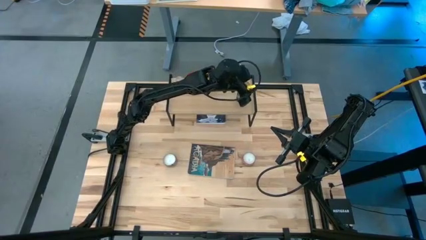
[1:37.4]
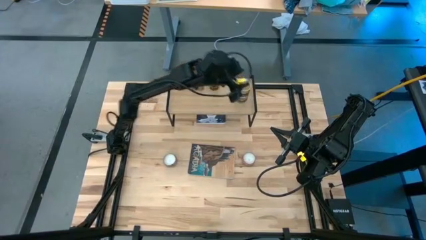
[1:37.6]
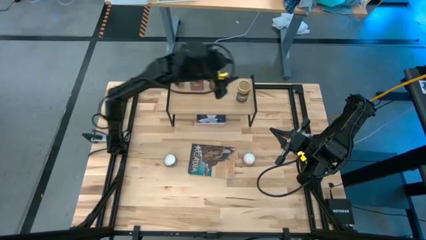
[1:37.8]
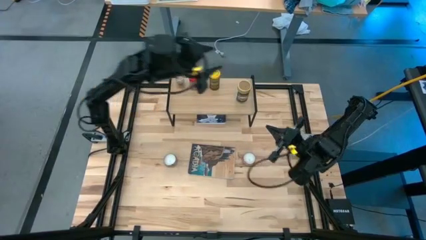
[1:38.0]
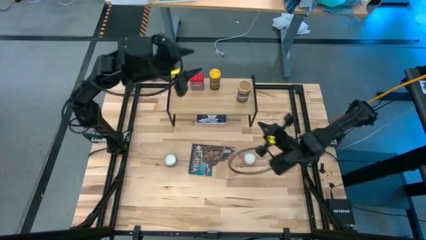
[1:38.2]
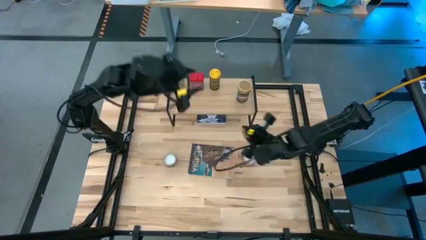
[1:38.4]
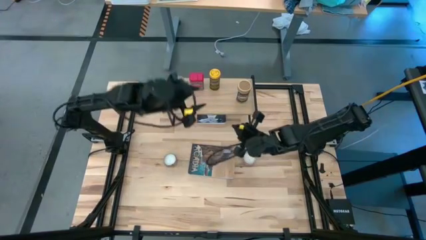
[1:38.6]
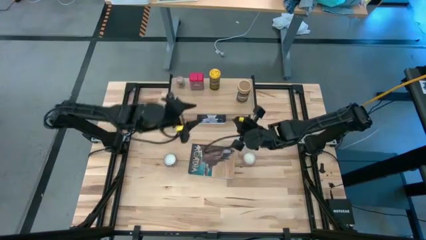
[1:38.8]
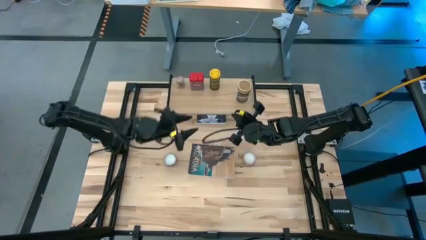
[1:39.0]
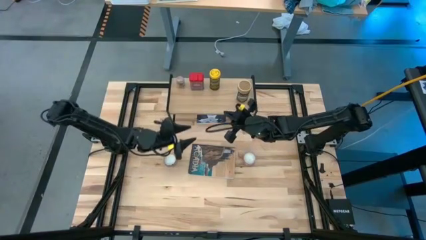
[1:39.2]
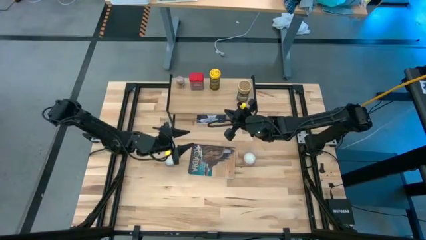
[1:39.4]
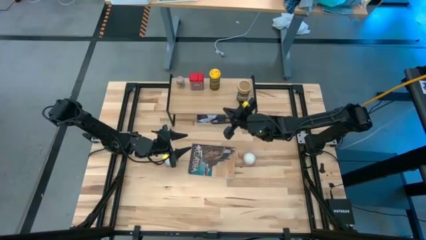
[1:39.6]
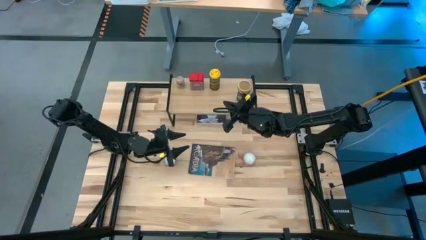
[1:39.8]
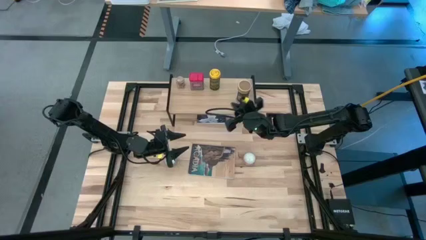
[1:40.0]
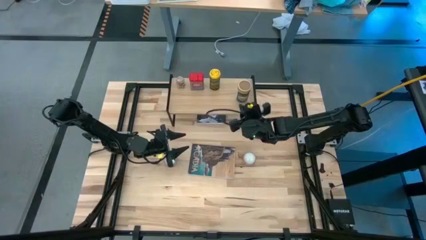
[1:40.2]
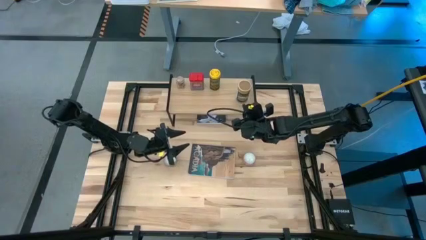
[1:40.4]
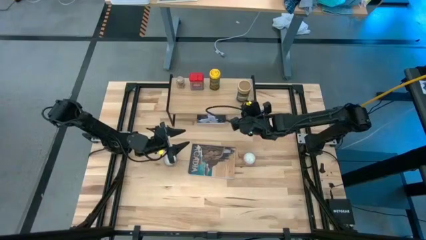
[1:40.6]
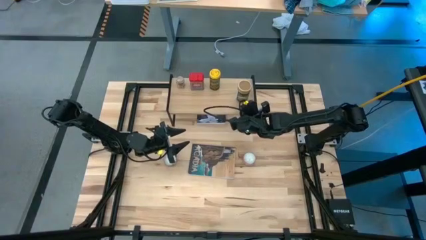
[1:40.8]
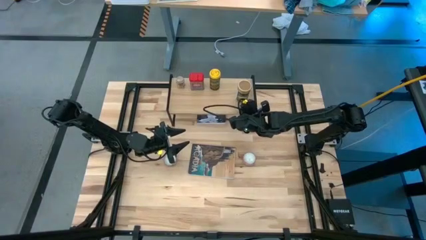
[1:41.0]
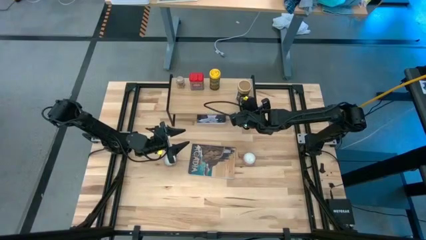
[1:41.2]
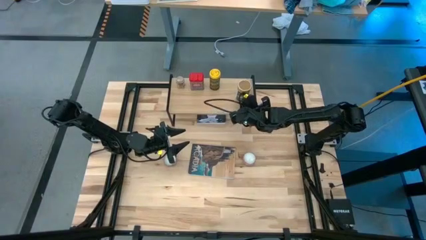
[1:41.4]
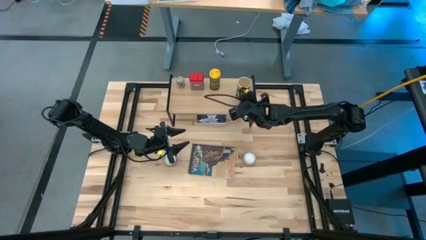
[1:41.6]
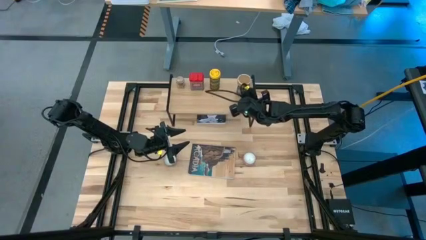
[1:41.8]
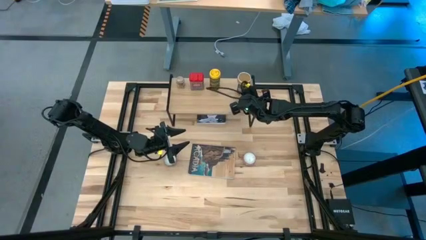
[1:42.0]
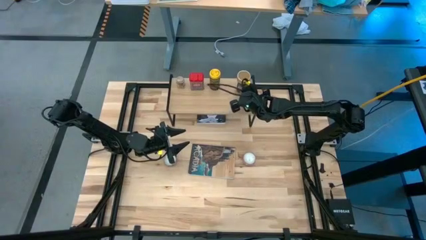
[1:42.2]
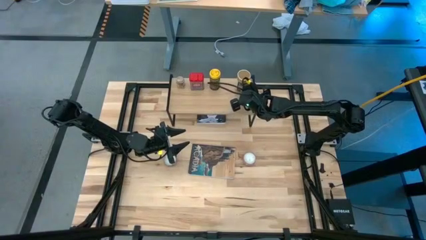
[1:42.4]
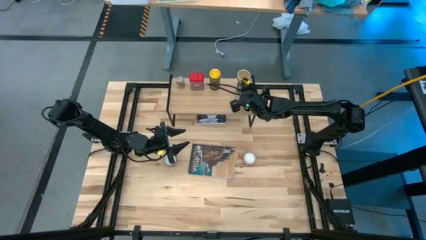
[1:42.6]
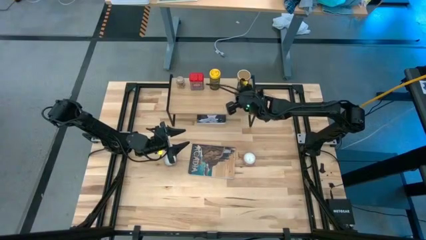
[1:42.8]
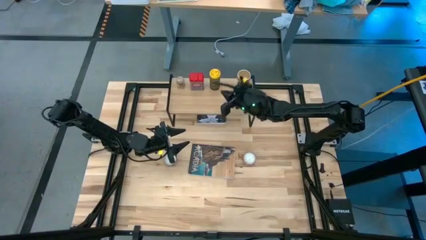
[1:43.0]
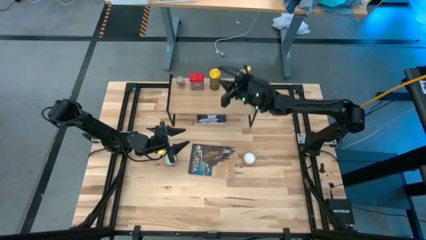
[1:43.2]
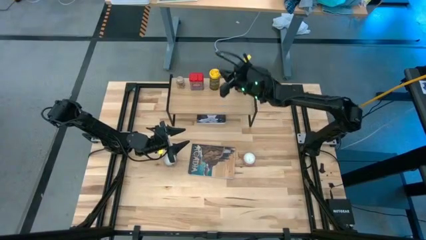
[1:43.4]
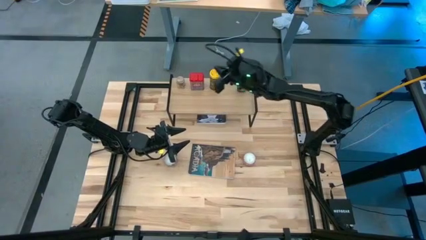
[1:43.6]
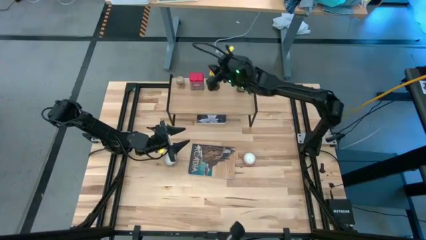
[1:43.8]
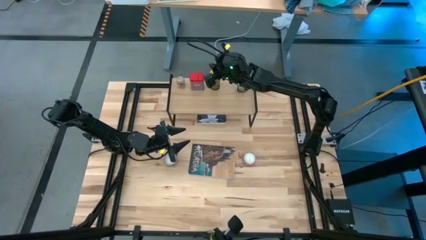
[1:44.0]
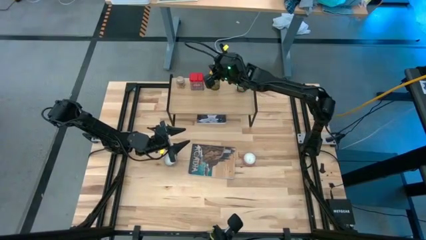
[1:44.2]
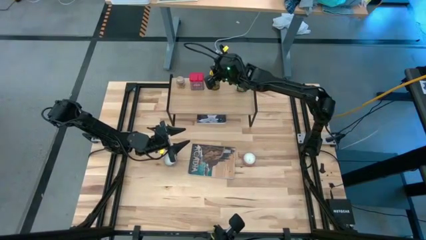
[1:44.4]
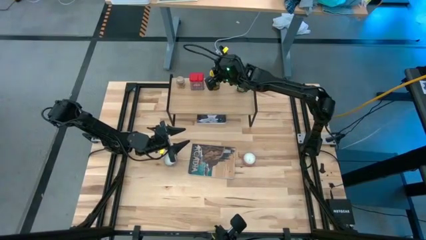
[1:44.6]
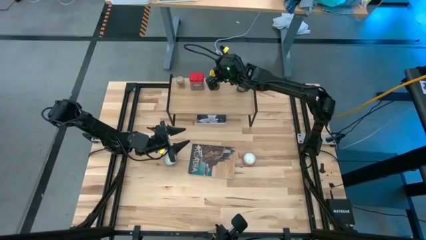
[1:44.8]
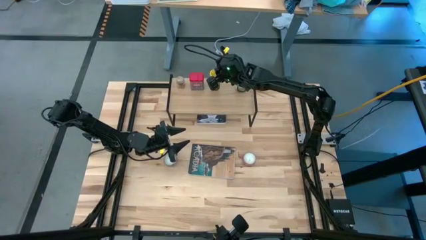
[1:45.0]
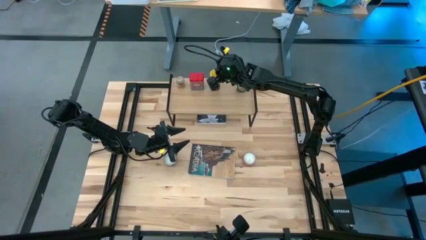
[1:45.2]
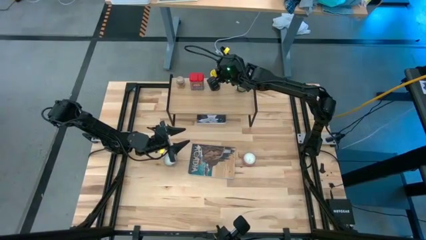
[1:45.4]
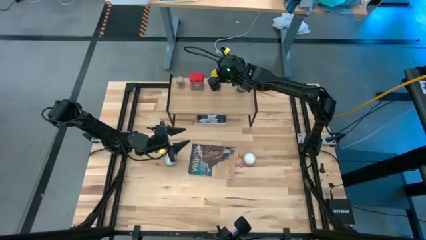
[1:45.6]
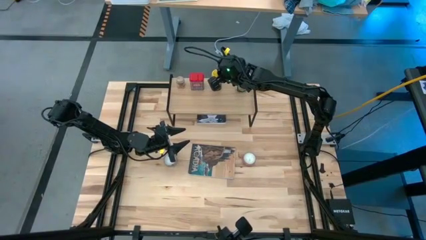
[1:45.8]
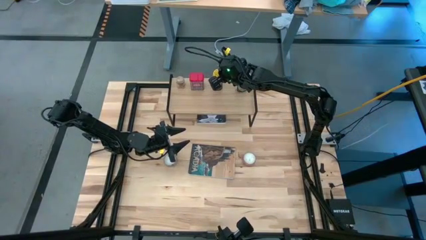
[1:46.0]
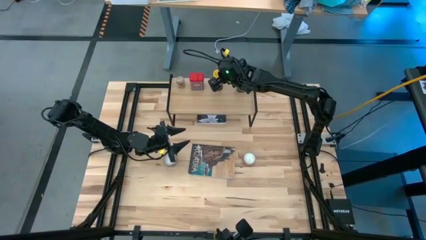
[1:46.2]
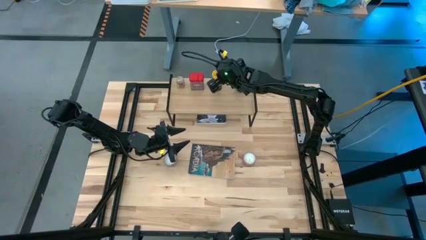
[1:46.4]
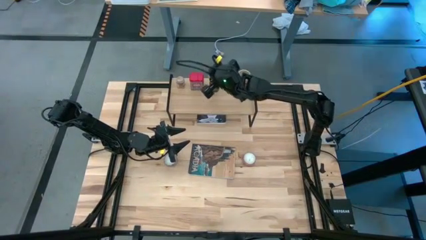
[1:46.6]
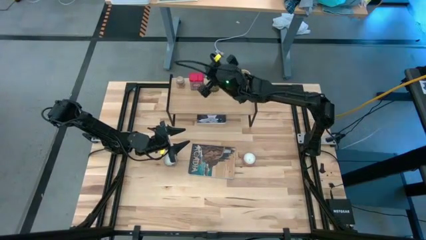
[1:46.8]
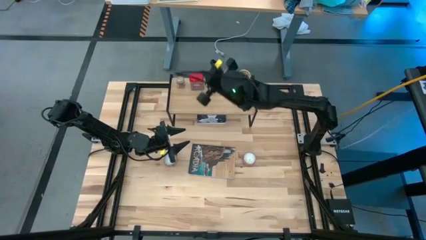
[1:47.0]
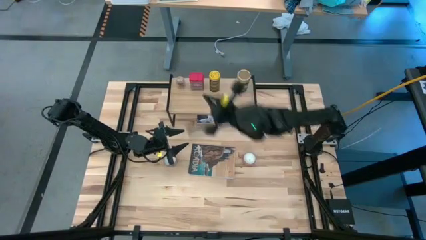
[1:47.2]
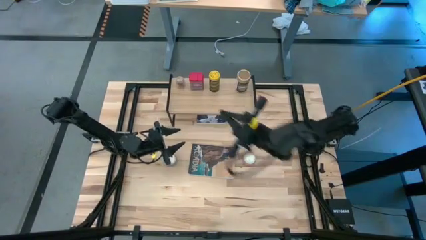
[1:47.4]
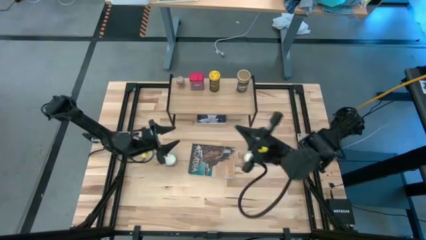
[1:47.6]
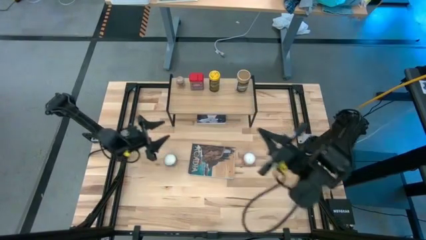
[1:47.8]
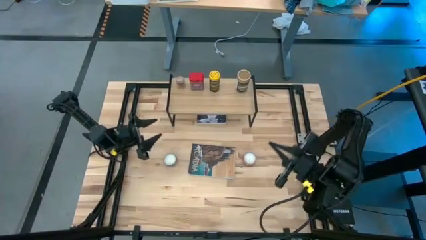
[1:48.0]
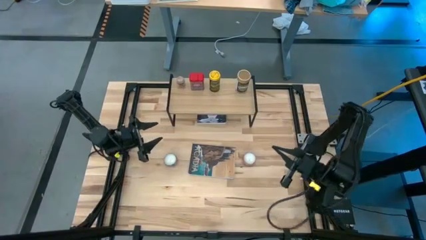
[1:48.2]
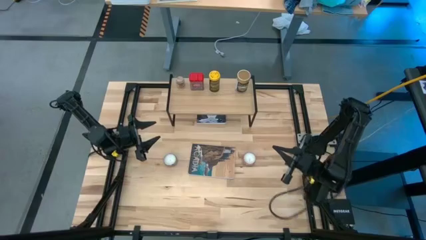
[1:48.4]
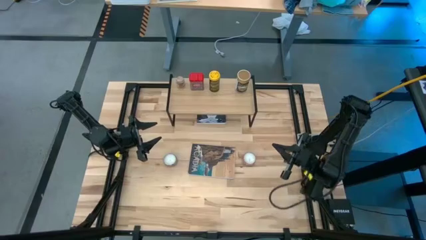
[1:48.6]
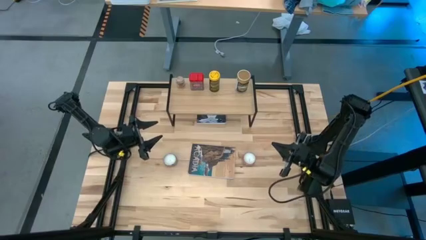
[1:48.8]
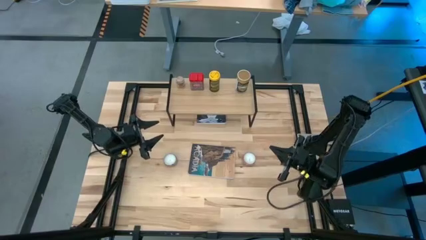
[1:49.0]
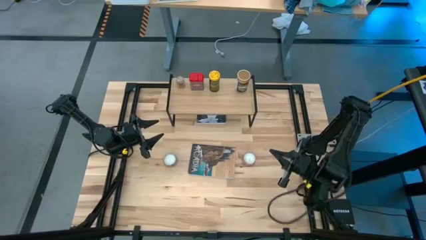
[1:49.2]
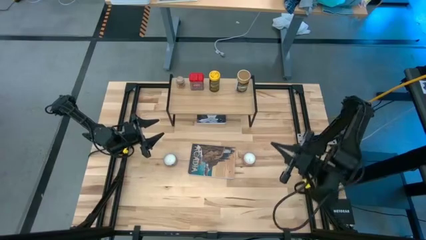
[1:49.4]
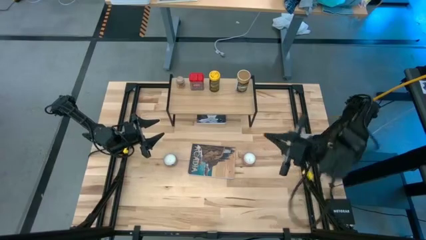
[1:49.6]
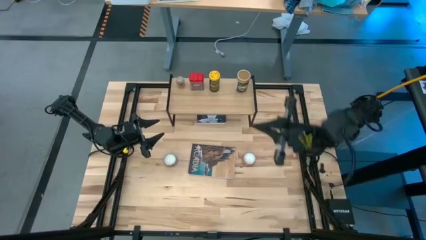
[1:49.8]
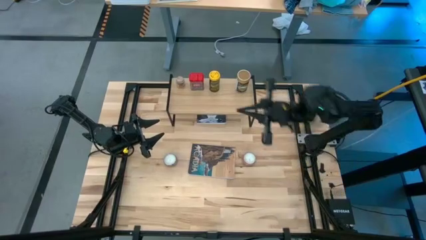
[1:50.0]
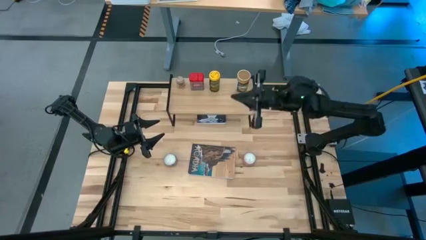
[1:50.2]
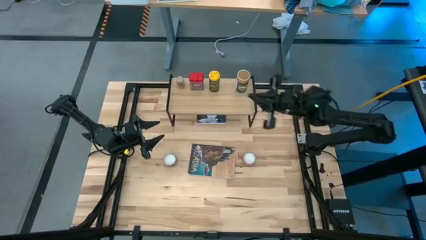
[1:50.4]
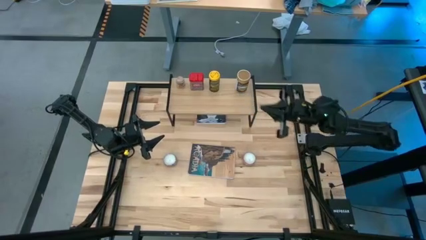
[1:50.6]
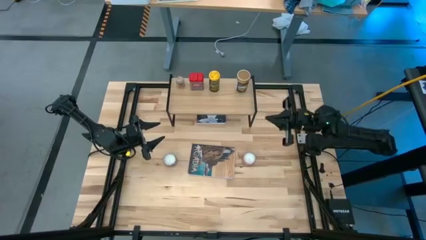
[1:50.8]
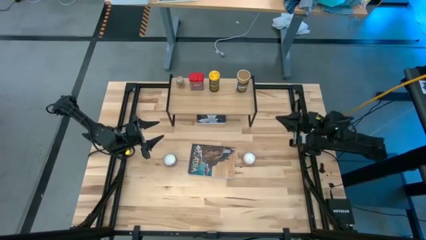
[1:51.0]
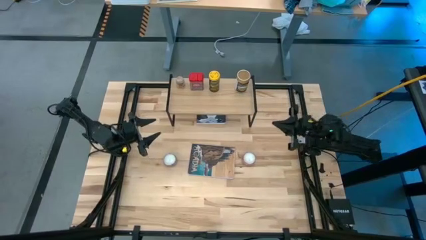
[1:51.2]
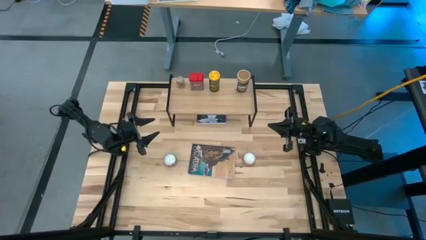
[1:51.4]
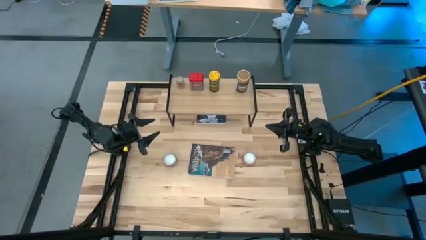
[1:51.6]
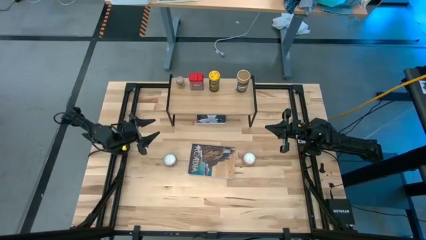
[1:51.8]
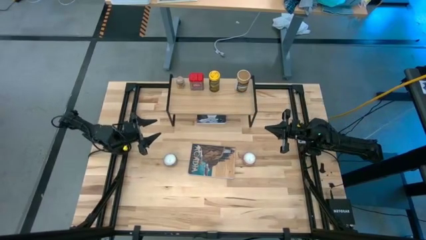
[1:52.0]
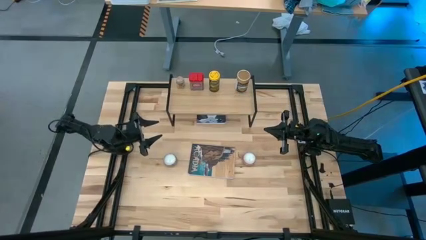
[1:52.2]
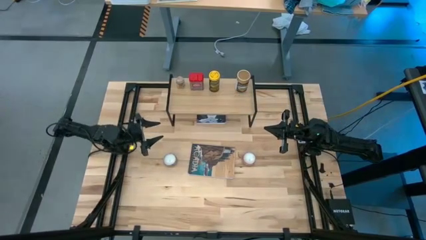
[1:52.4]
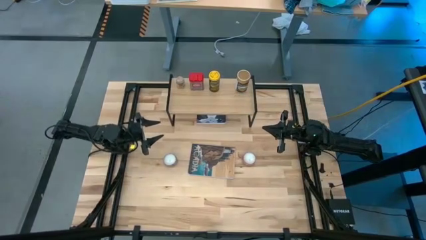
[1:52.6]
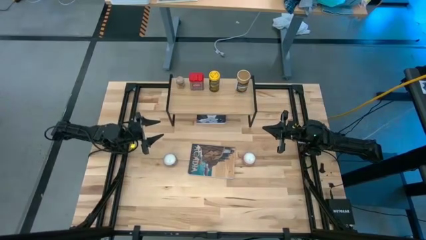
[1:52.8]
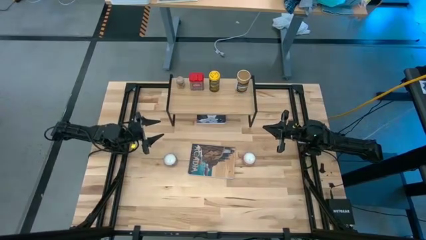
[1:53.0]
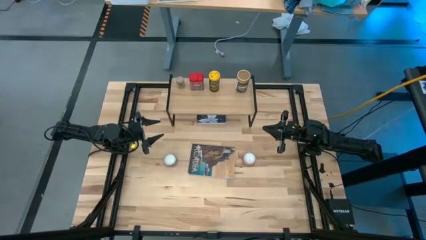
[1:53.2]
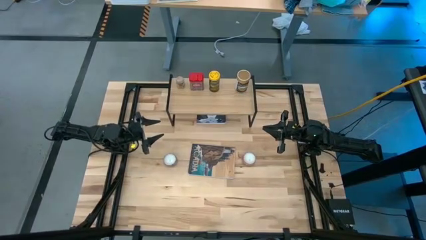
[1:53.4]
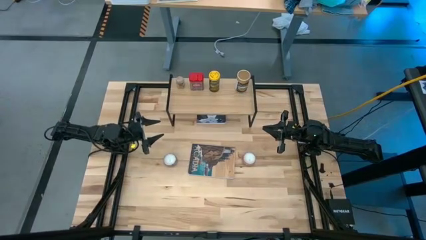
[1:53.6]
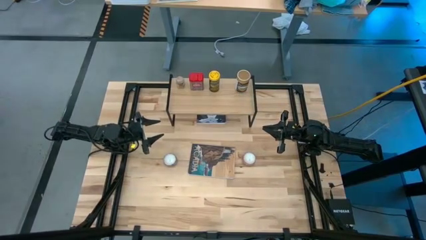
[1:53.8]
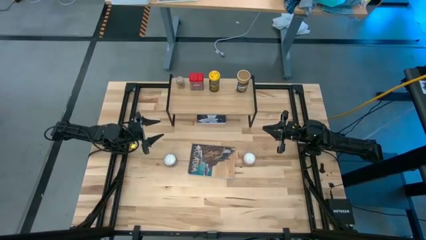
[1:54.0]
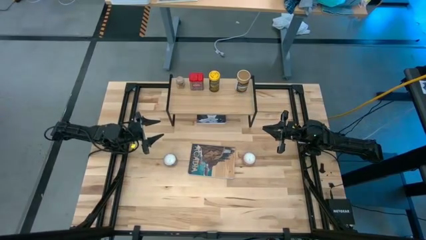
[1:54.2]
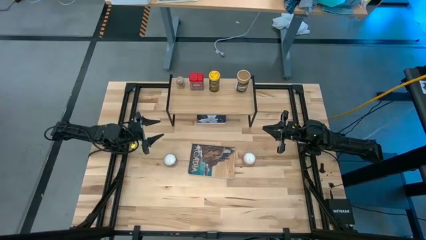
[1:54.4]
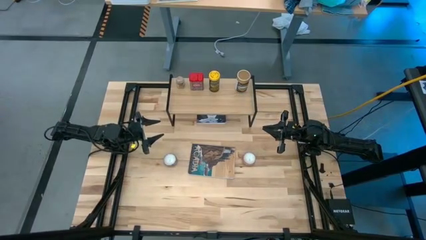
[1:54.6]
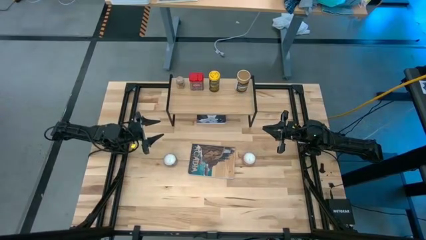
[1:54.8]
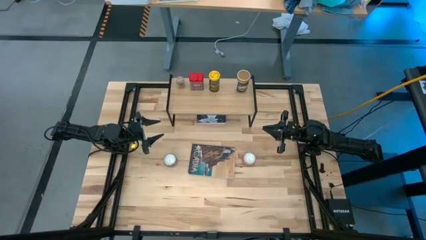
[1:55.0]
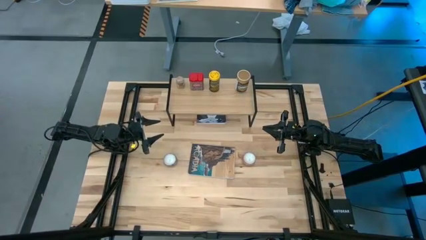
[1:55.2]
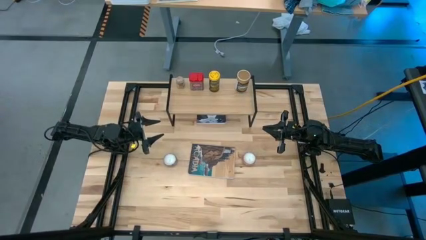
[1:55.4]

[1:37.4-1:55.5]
Task: Shelf spices
Return to Home Position
